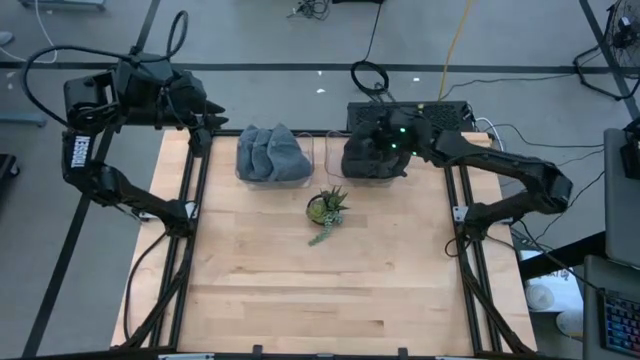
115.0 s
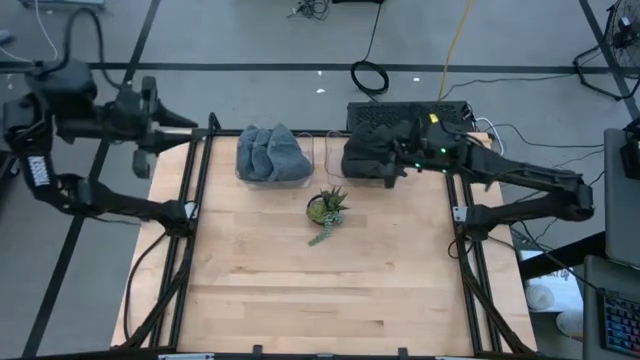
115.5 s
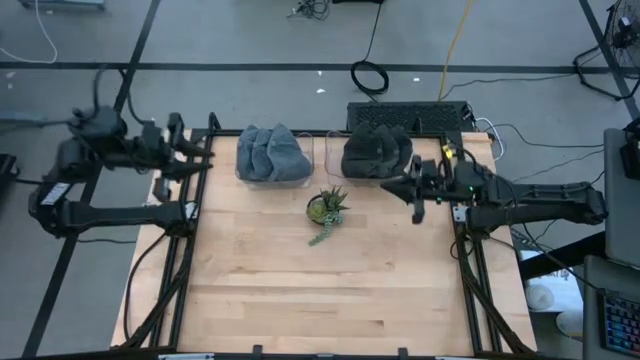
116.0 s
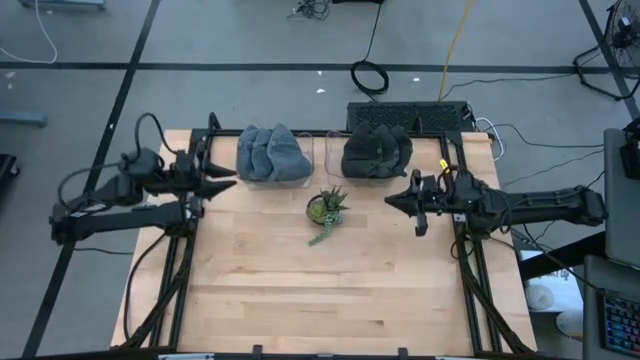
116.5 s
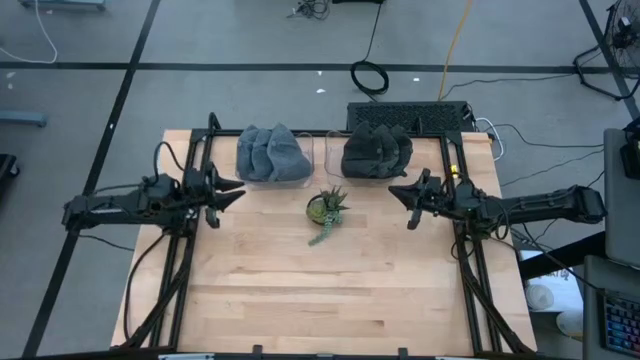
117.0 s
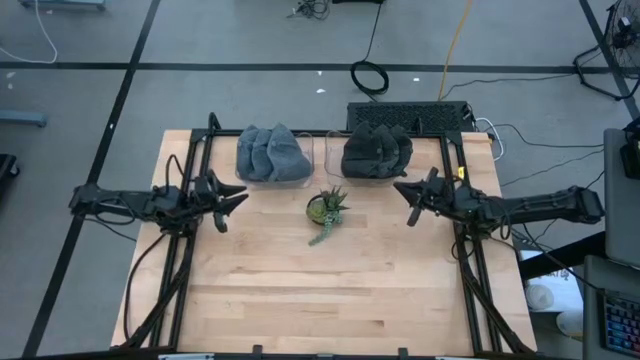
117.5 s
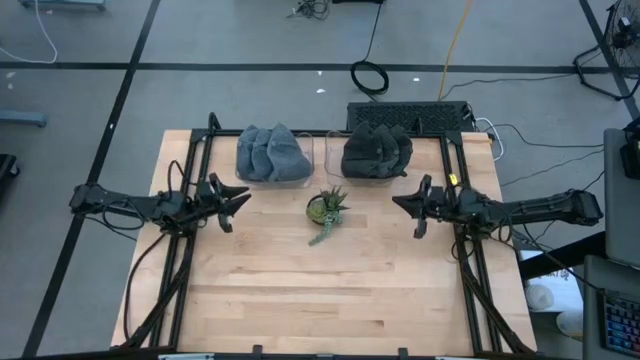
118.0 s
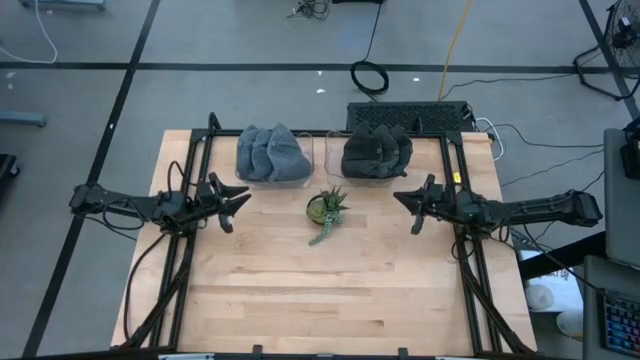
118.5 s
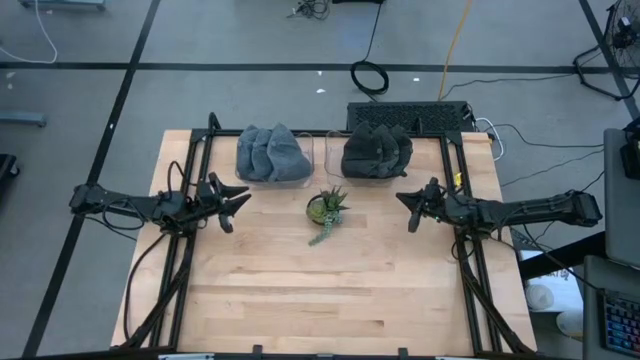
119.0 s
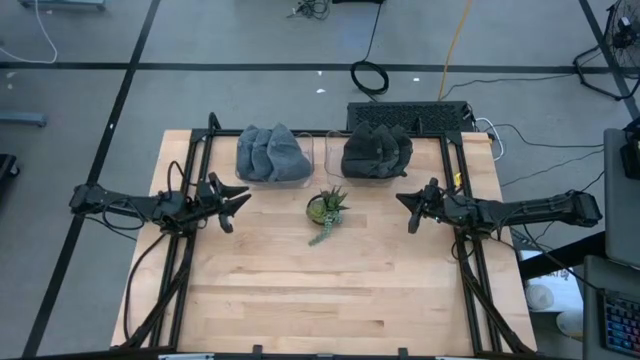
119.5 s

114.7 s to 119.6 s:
Task: Pick & Place hat
Return to Home Position

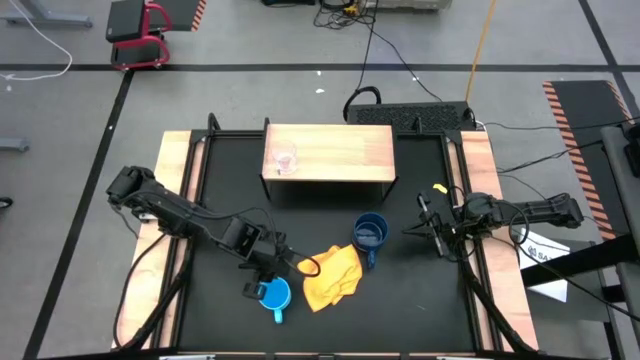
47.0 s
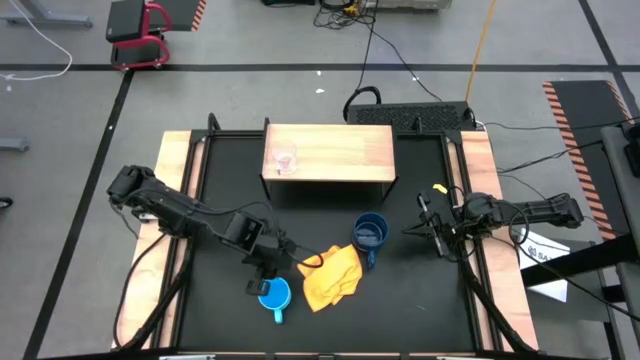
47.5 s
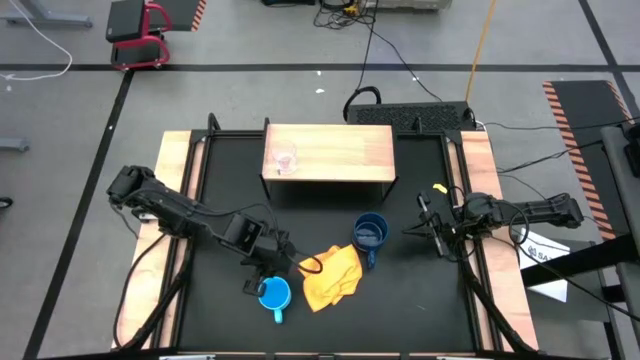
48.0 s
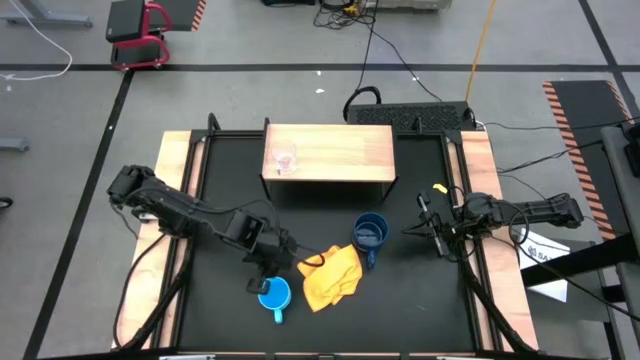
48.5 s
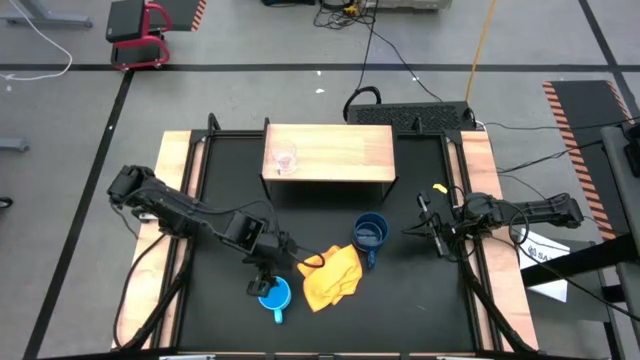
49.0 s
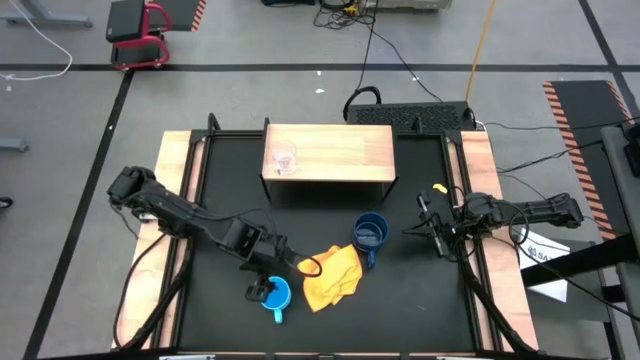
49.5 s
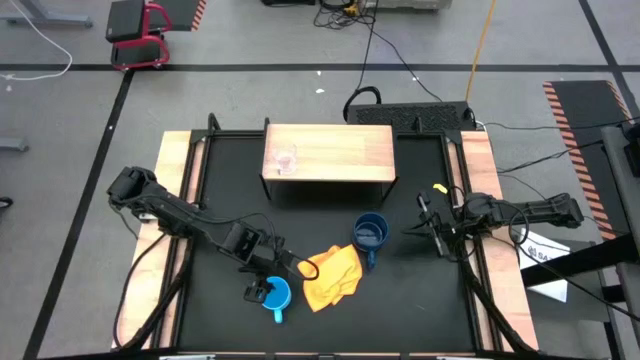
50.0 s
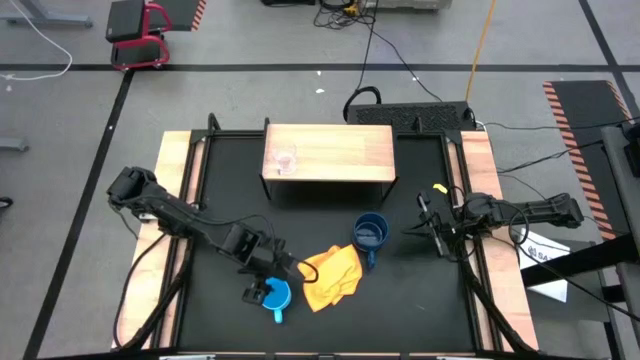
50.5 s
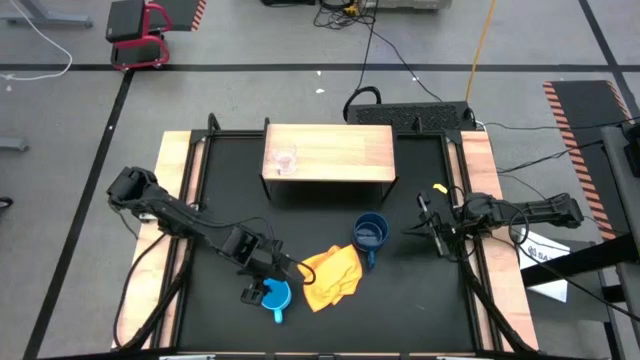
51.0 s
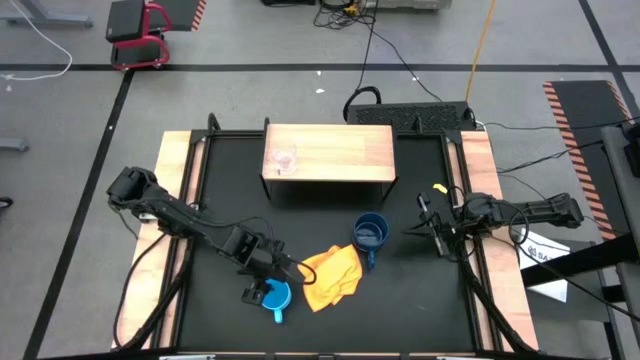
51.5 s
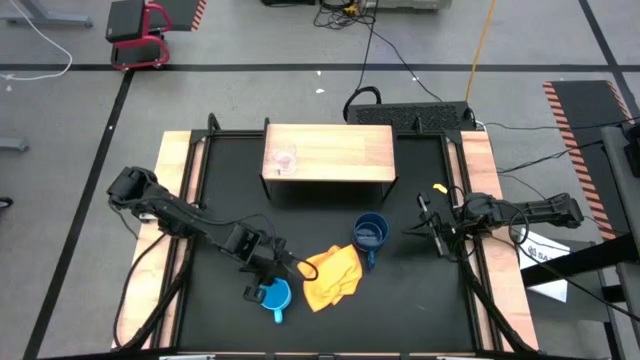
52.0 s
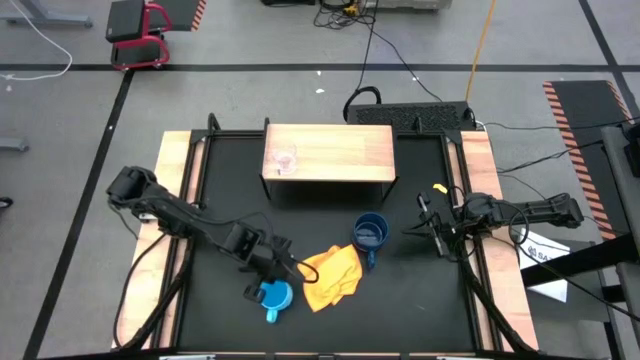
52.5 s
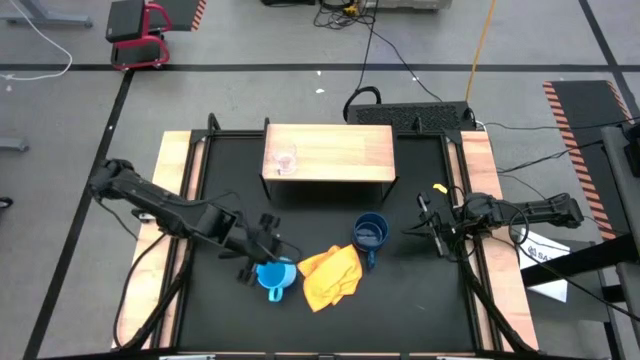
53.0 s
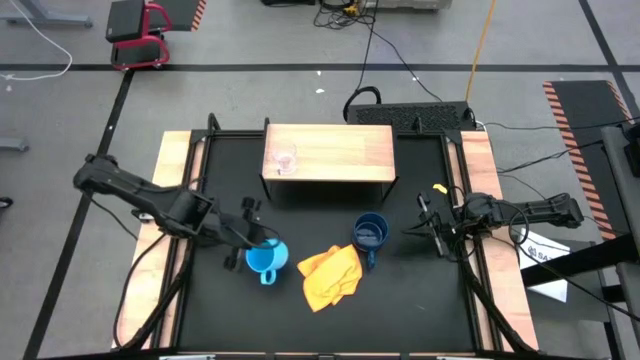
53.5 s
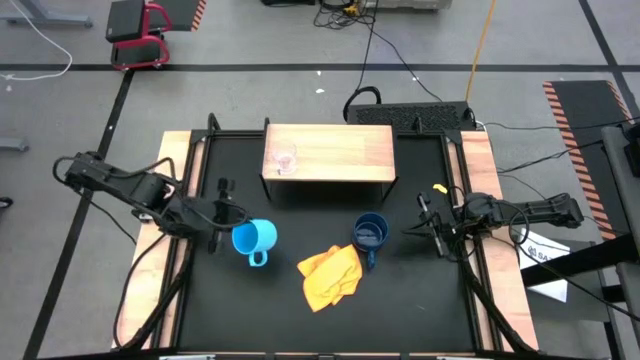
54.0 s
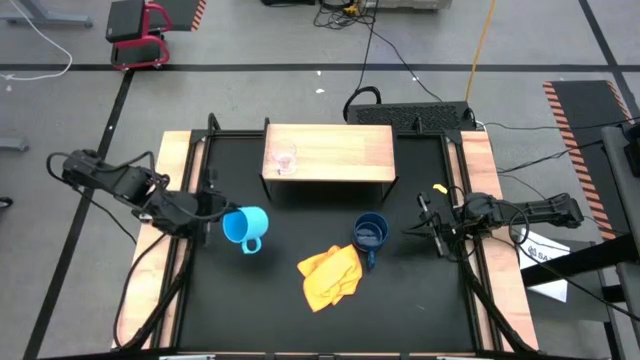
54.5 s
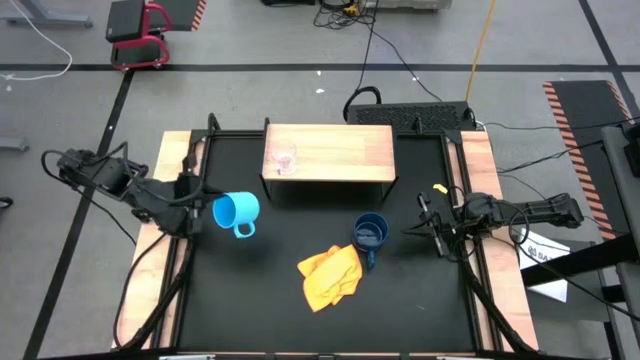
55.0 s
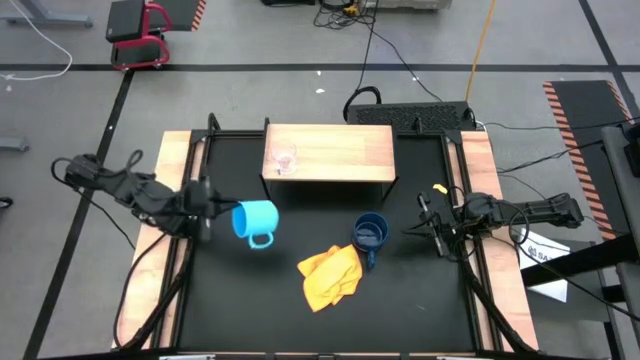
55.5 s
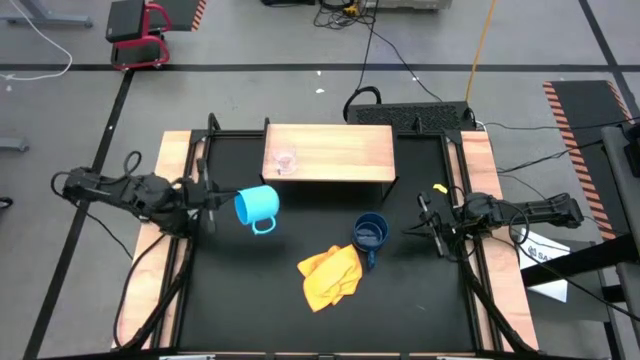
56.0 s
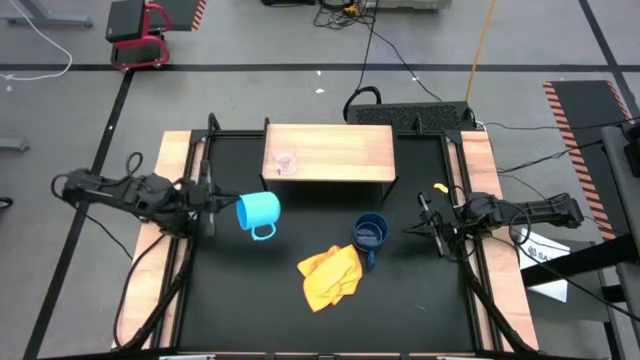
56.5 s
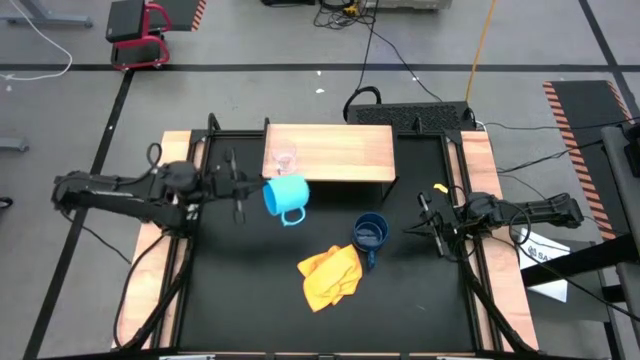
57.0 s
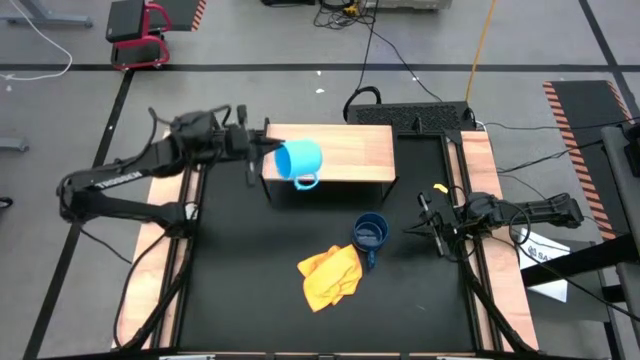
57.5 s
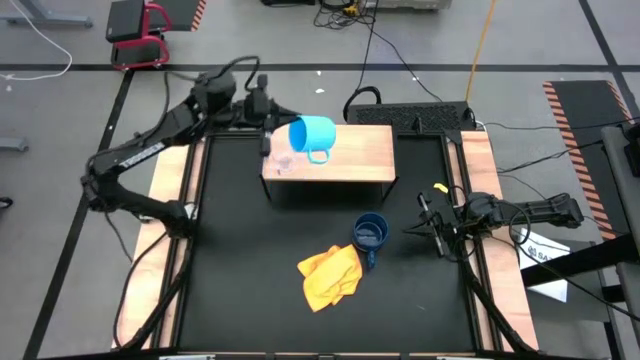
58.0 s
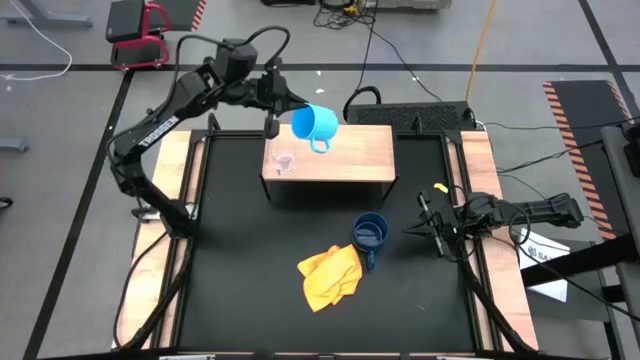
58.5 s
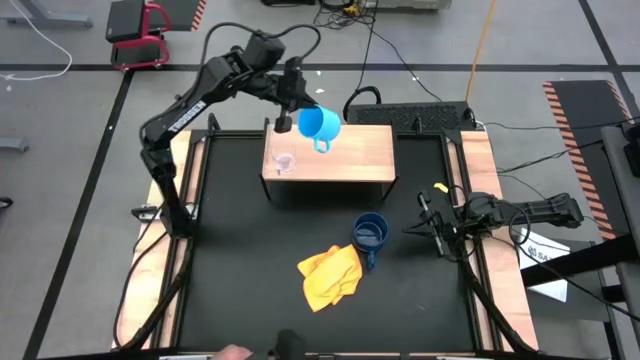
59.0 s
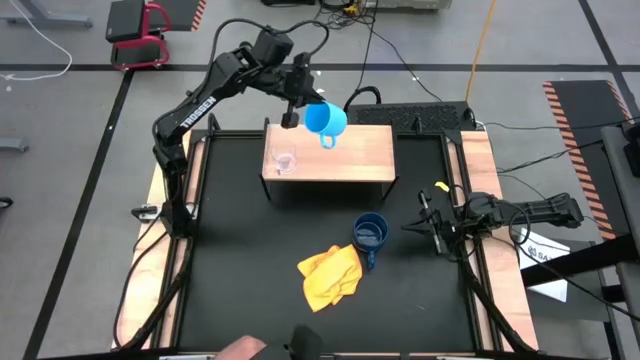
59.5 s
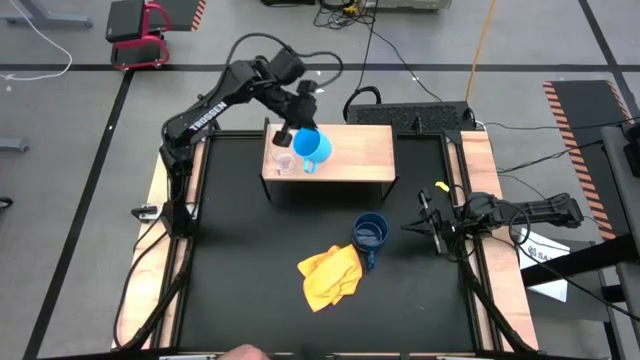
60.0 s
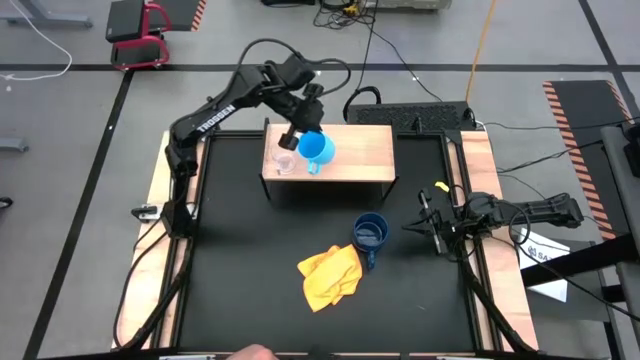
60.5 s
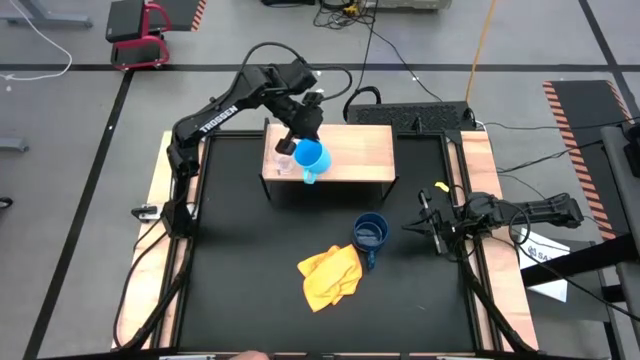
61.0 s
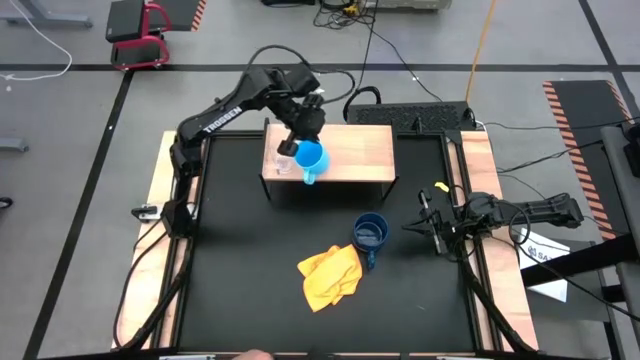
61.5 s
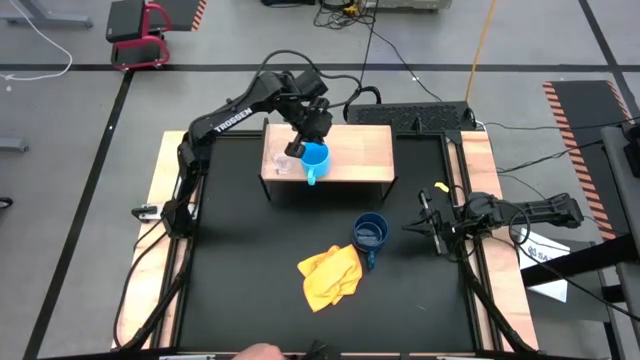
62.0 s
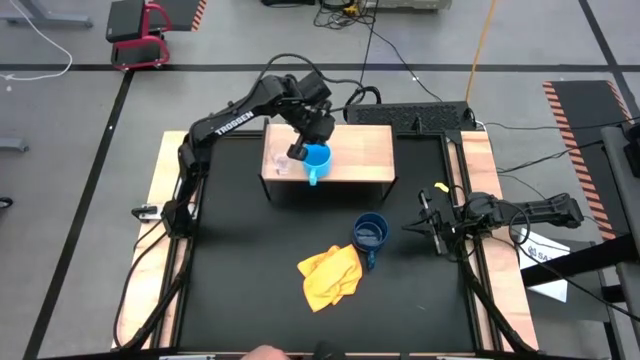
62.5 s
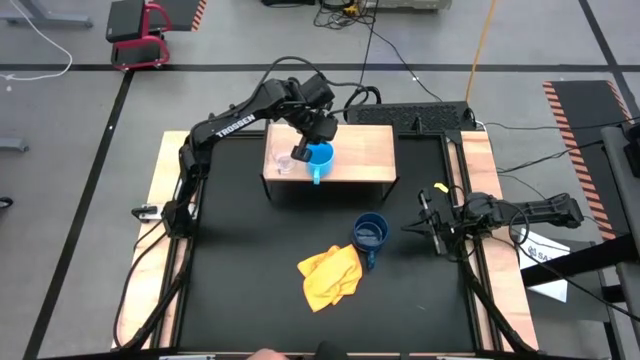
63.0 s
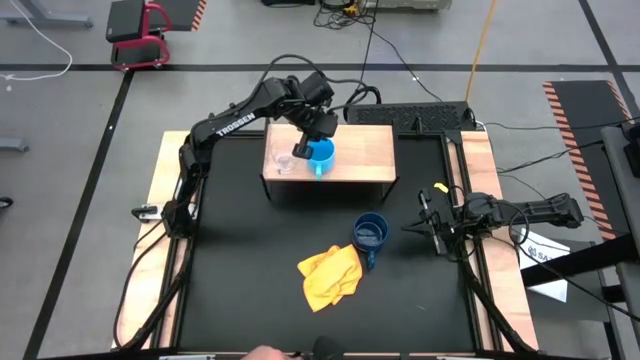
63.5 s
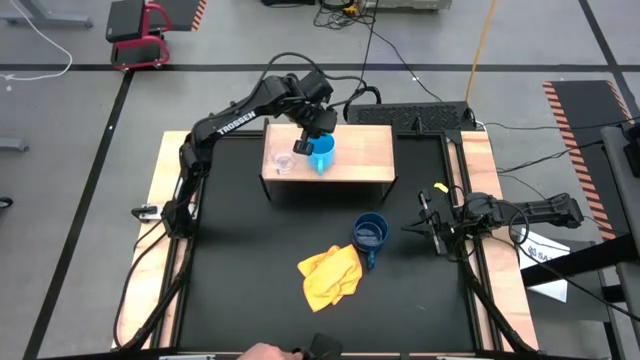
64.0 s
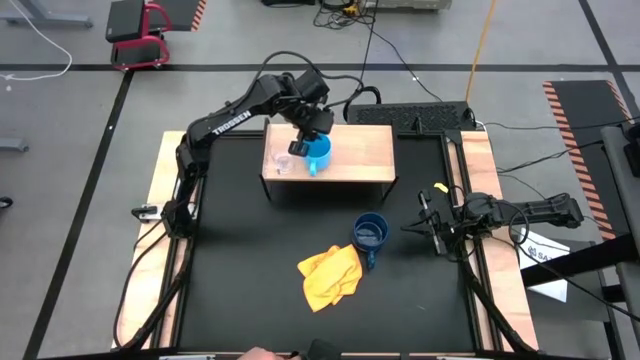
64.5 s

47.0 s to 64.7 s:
Task: Stack small to large cups/mugs on shelf
Put the light blue mug on the shelf
